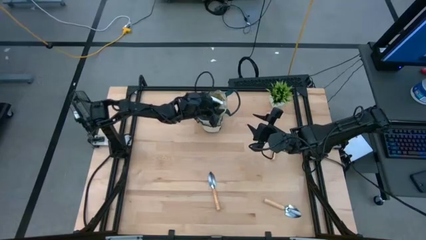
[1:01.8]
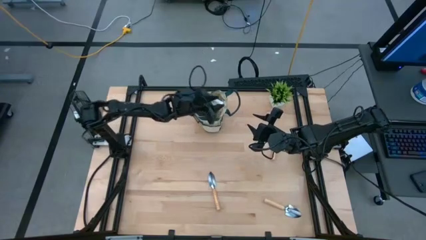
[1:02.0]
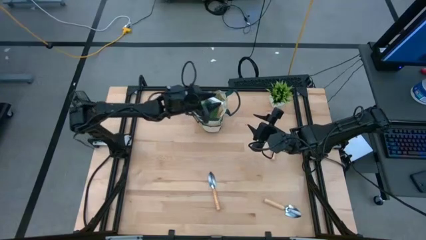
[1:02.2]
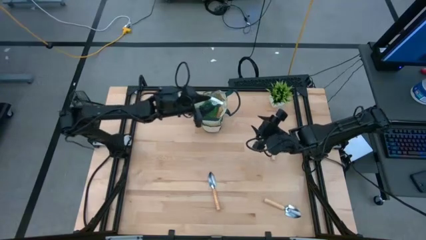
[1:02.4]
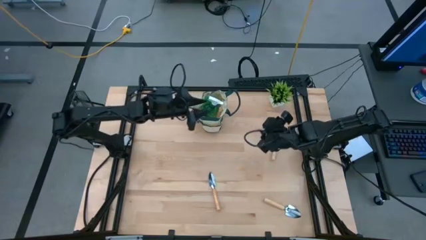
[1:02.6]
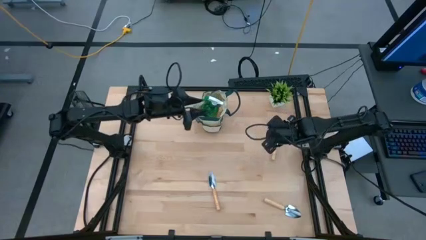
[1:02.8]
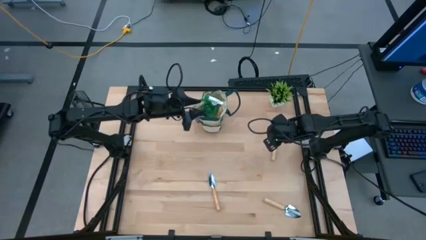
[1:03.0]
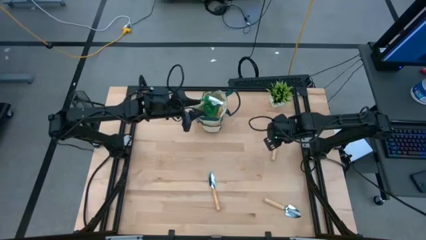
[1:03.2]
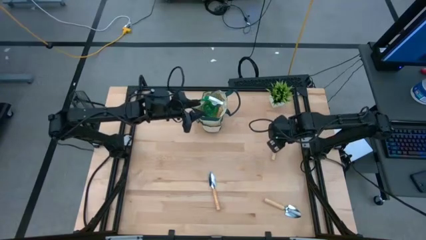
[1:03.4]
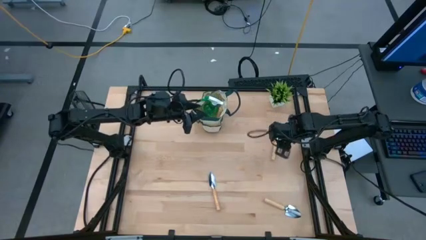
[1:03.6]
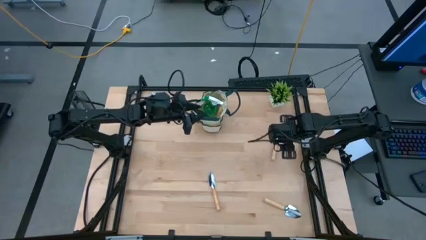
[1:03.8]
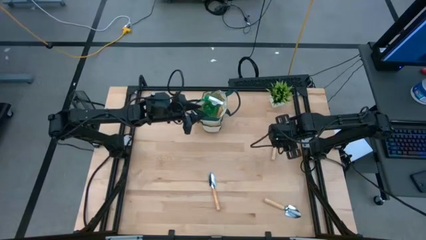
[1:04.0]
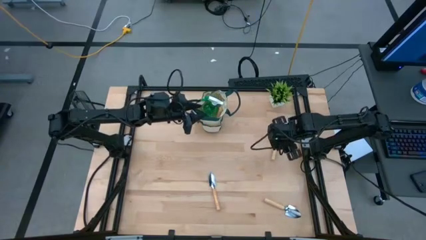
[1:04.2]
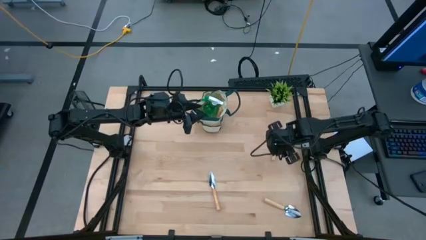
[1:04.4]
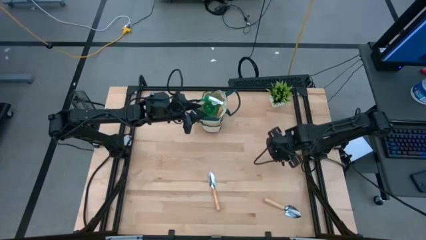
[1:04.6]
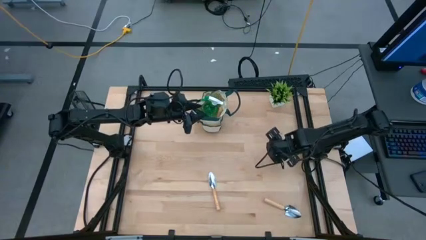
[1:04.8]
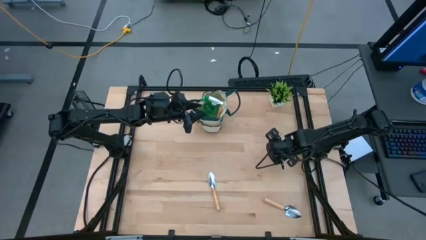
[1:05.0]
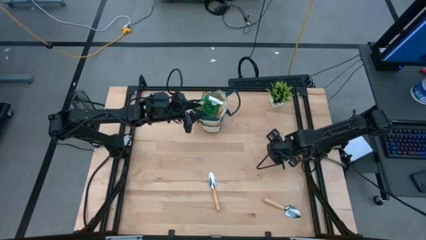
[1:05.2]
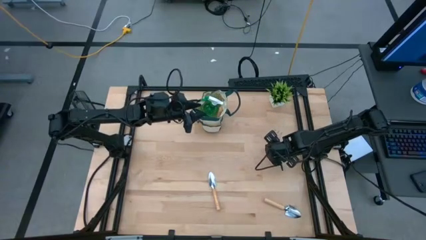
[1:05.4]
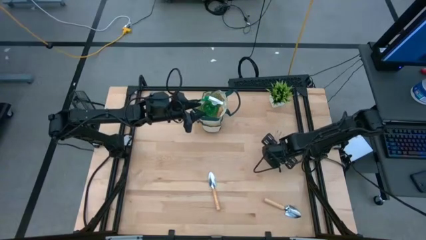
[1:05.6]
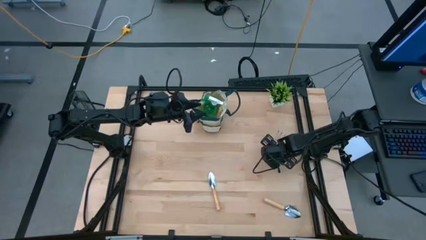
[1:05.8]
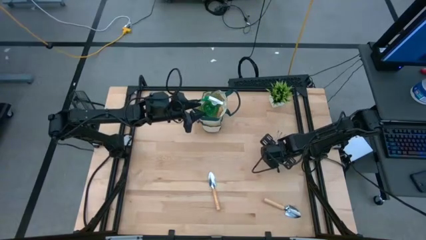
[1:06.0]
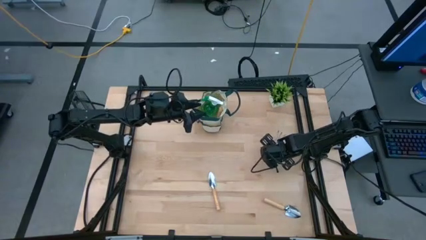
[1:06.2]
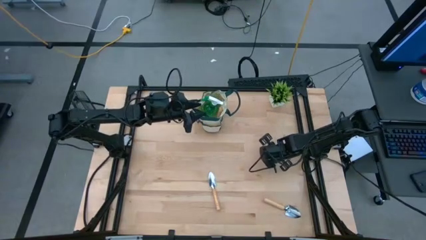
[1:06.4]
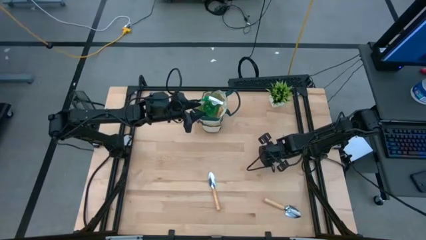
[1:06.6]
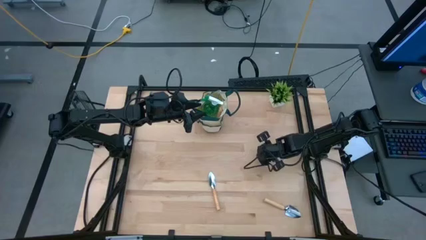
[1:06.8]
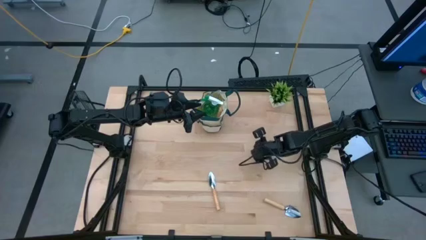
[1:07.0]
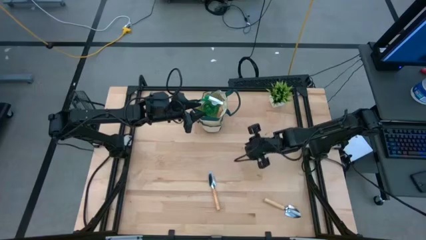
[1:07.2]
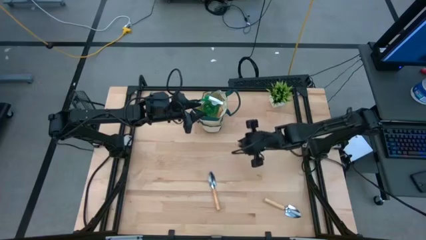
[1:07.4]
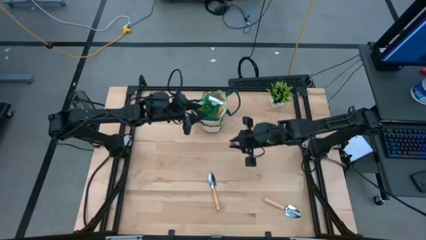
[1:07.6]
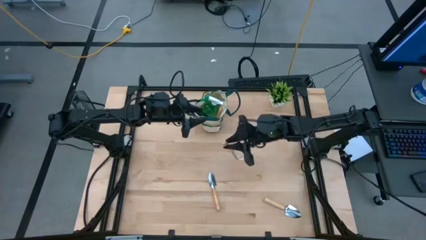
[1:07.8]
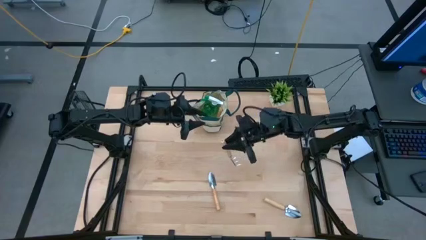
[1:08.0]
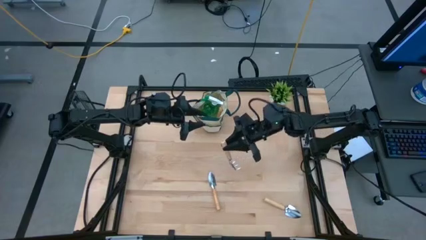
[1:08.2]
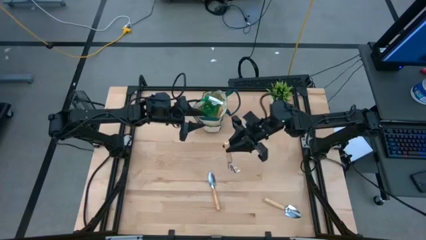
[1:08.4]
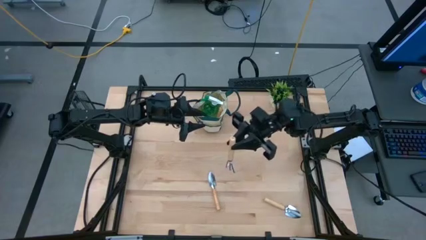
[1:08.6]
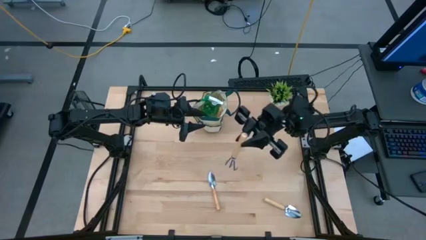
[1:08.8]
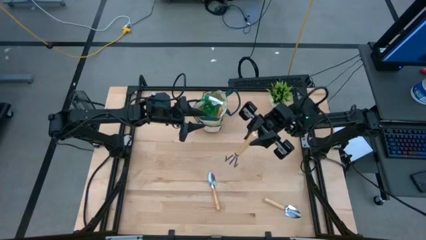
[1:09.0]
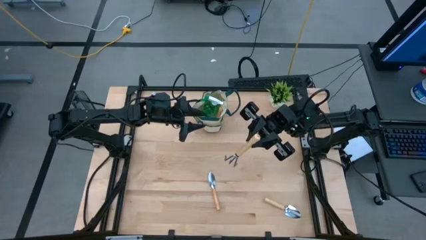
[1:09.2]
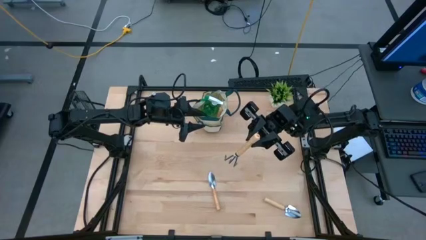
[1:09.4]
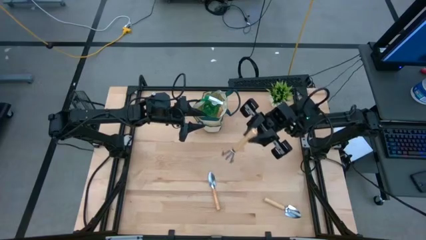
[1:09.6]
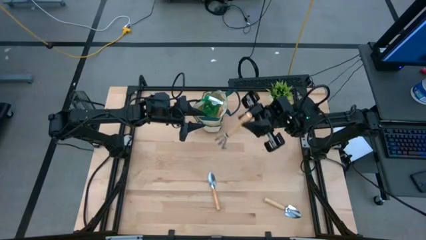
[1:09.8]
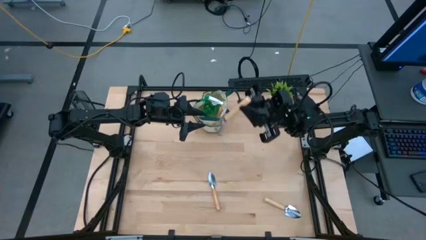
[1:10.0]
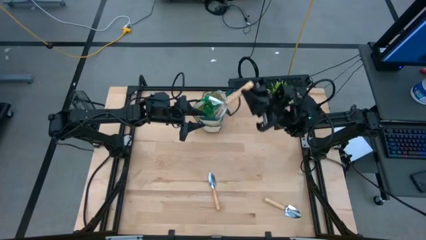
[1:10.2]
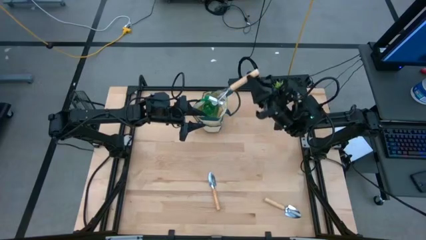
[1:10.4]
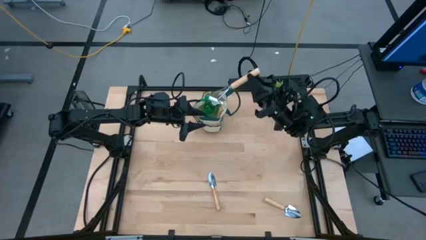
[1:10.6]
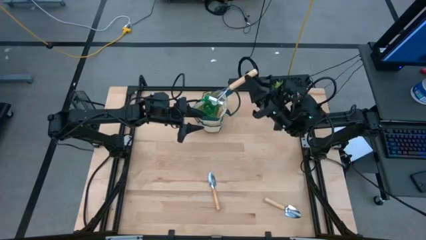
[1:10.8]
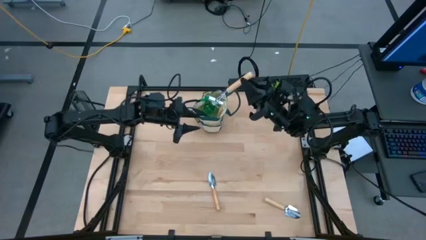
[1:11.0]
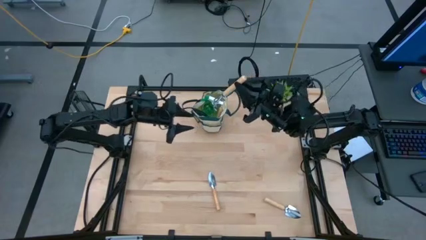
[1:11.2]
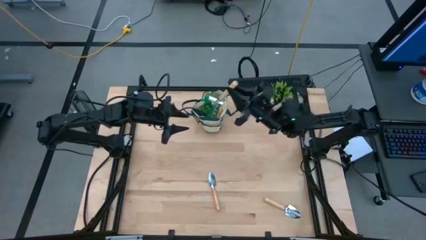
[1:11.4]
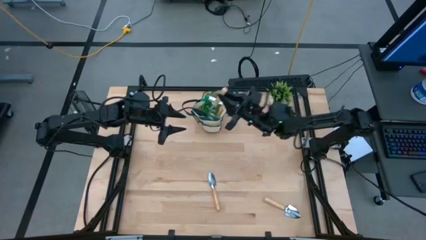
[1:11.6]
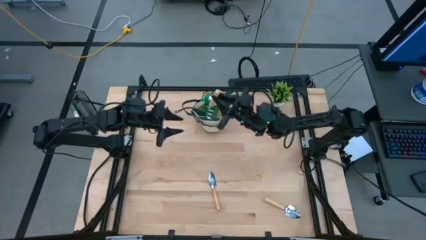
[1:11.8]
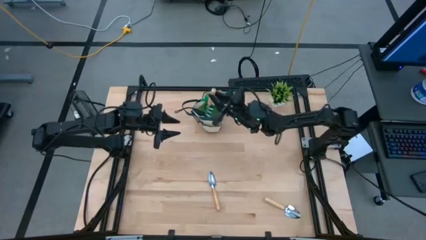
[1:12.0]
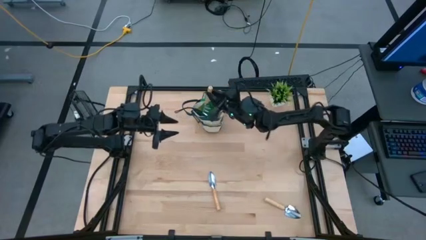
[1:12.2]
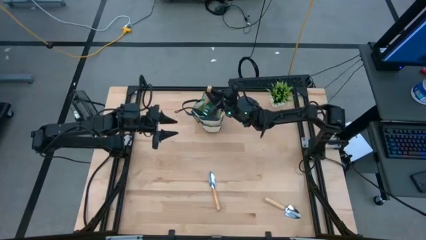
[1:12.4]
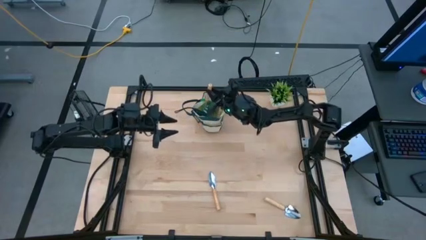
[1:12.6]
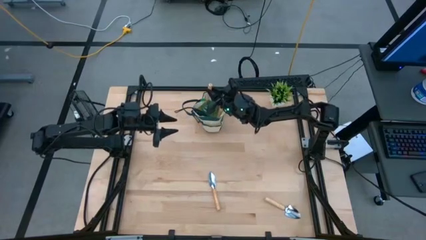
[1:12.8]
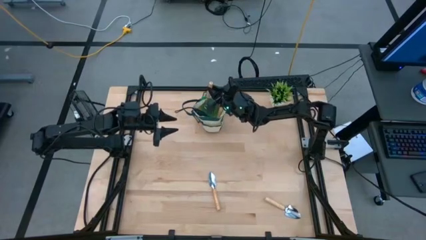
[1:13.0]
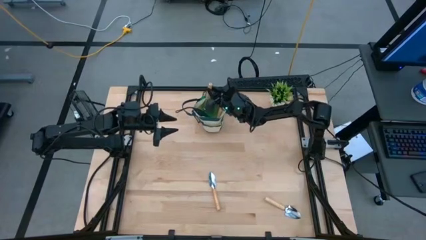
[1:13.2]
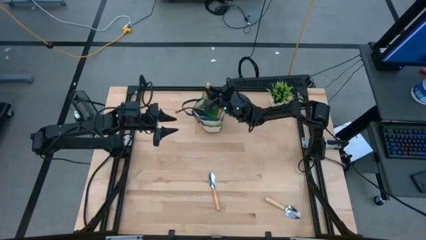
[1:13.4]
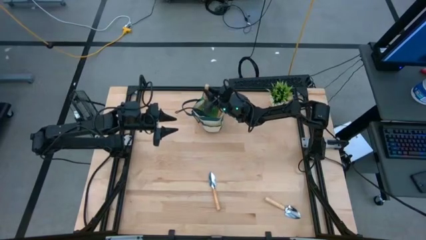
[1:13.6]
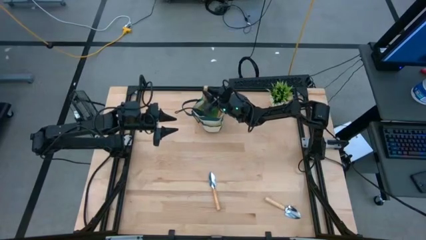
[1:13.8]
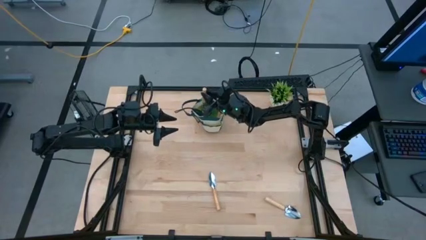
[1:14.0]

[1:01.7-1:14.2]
Task: Pick & Place Garden tools in Gardening bag
Put the brown hand rake into the gardening bag

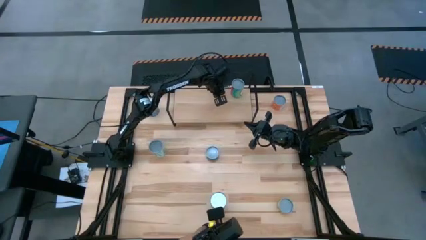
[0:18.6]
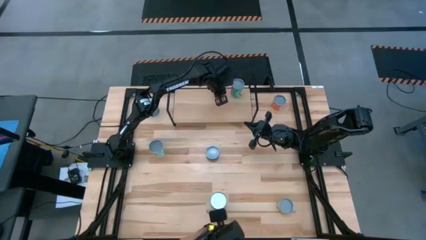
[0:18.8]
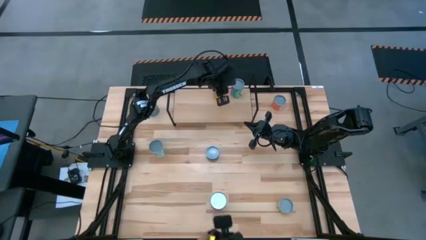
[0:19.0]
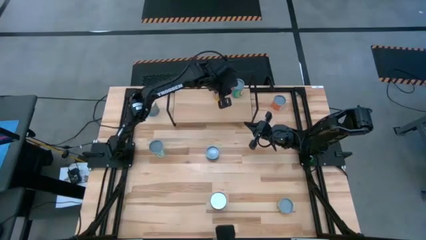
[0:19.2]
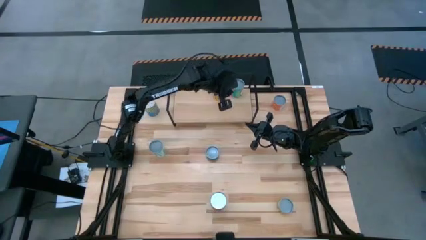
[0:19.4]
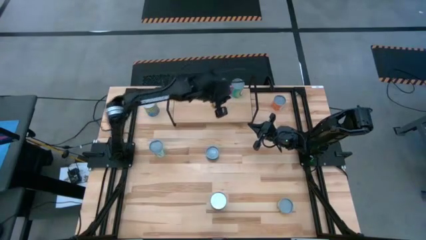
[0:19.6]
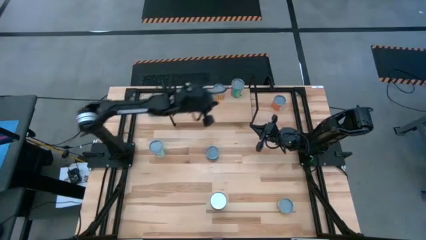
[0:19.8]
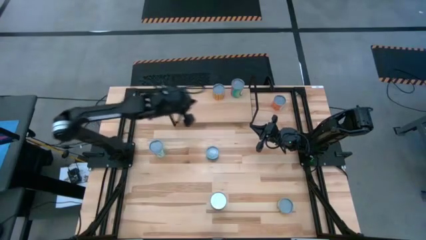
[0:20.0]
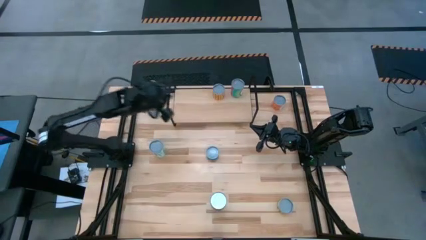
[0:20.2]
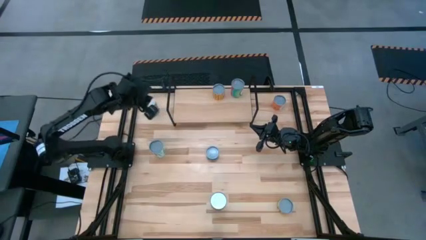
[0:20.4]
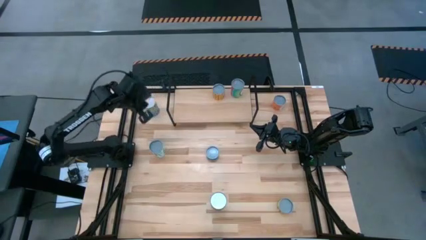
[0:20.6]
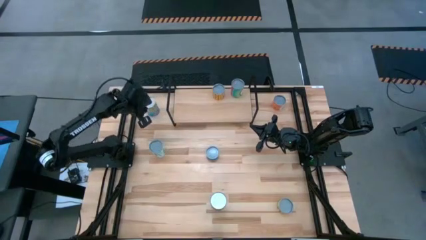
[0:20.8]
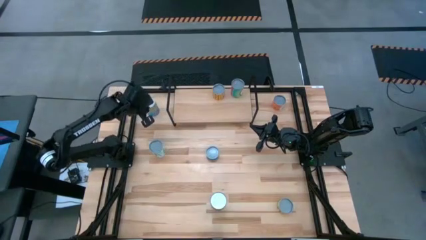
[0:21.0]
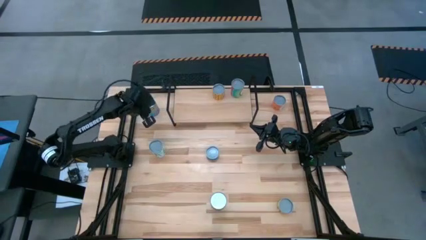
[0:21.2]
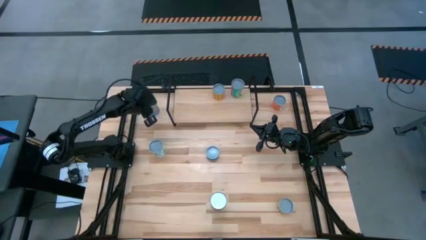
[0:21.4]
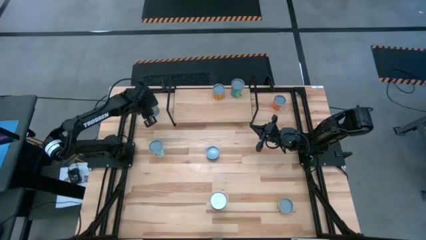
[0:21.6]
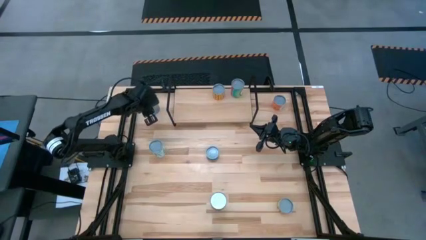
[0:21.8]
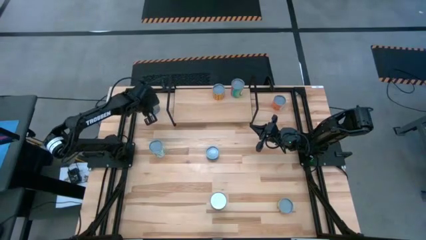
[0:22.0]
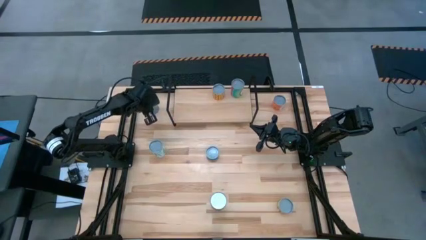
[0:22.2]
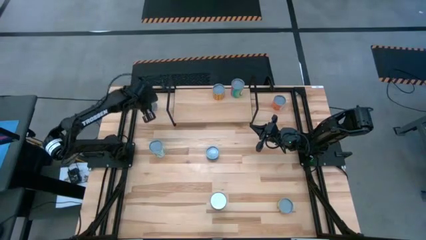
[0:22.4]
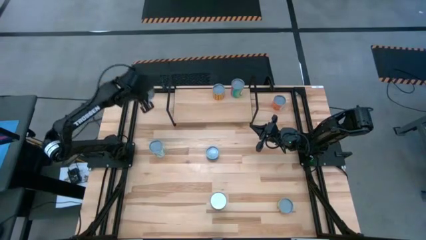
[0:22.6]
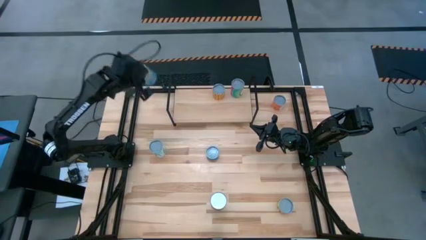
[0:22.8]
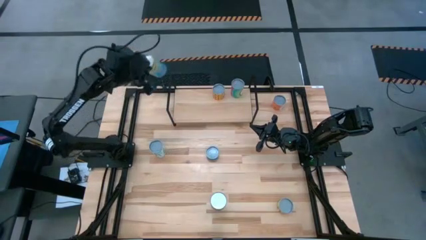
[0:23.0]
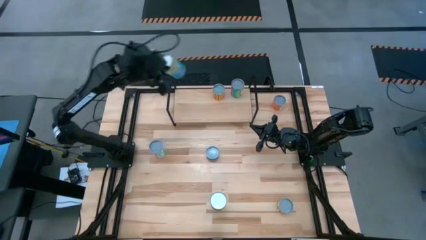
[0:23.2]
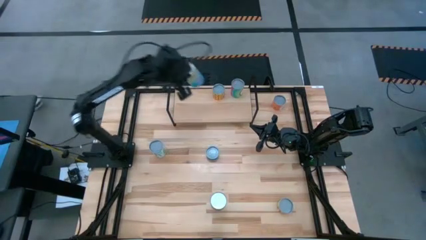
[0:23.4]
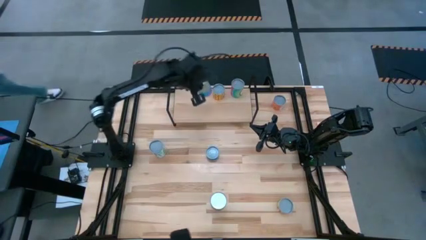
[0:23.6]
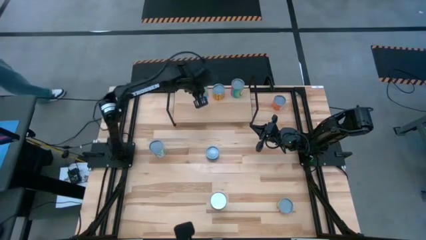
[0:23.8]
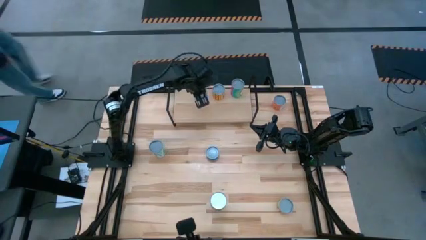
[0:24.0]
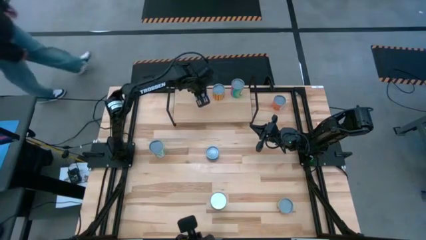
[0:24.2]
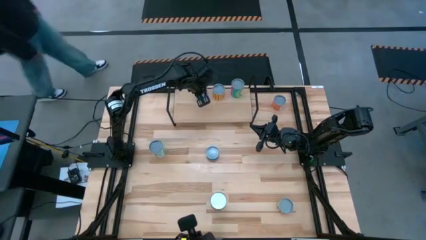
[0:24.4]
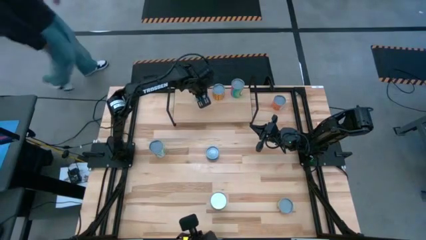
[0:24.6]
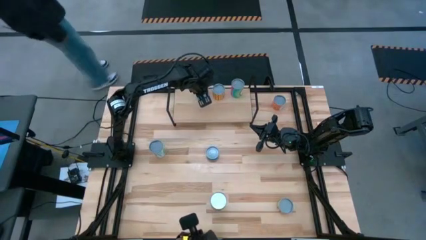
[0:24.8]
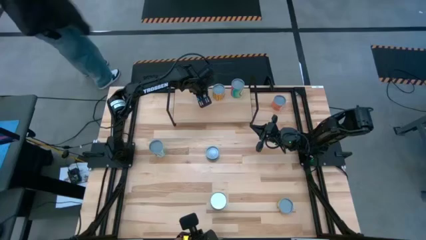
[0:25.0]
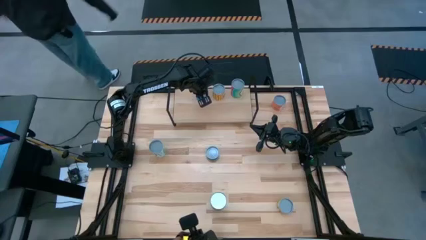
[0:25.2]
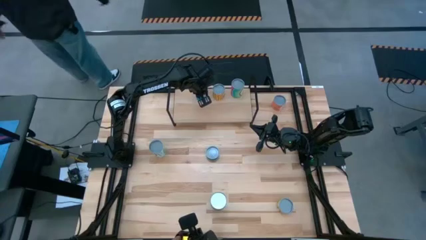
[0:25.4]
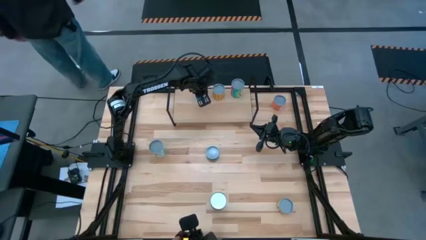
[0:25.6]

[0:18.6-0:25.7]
Task: Pick and place cans onto a shelf
Put the canned cherries on the shelf
